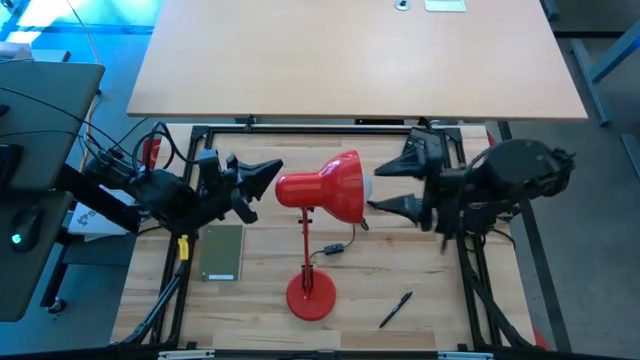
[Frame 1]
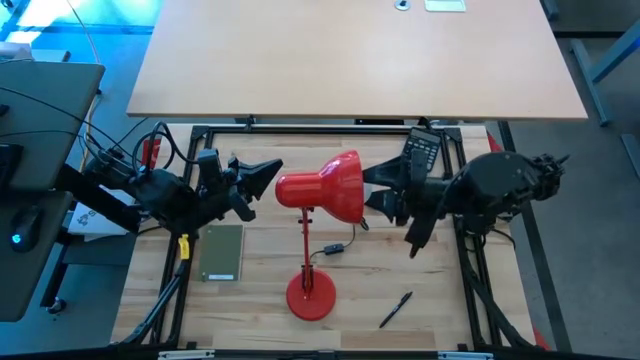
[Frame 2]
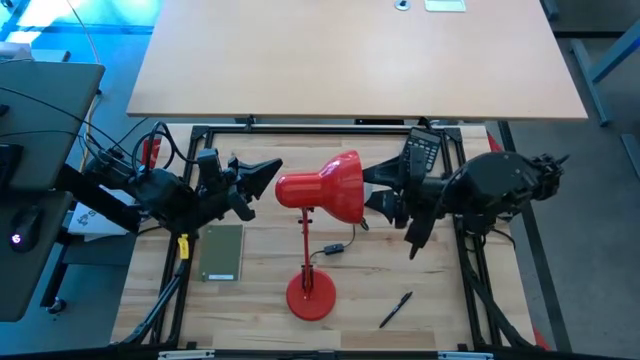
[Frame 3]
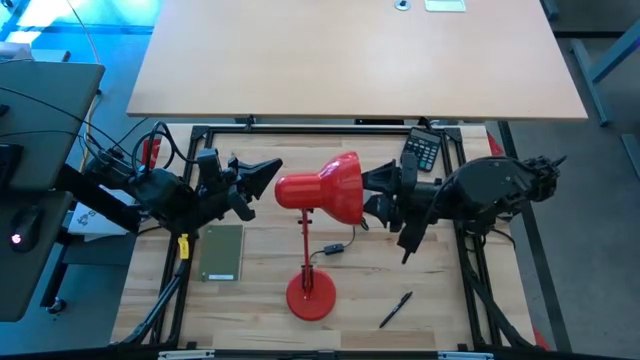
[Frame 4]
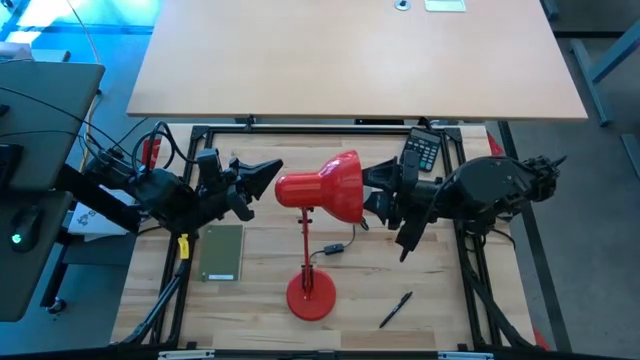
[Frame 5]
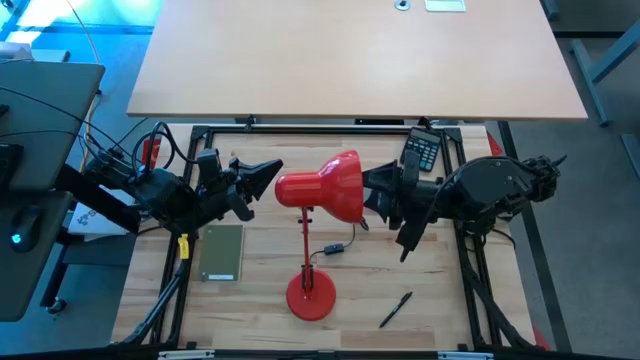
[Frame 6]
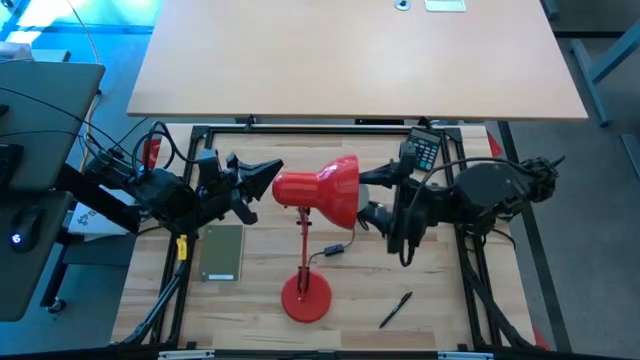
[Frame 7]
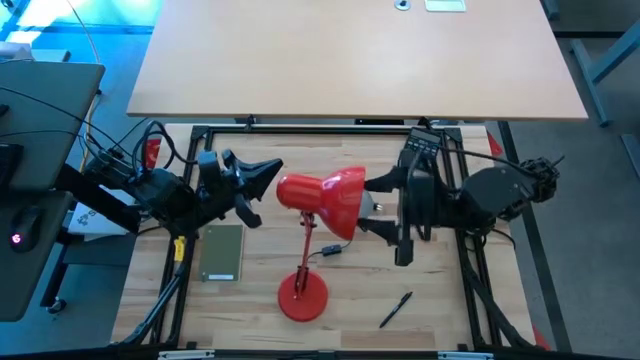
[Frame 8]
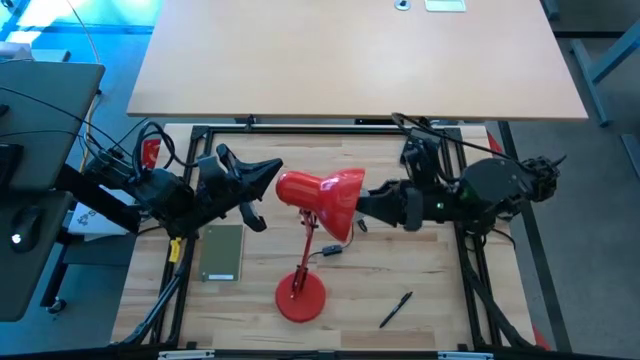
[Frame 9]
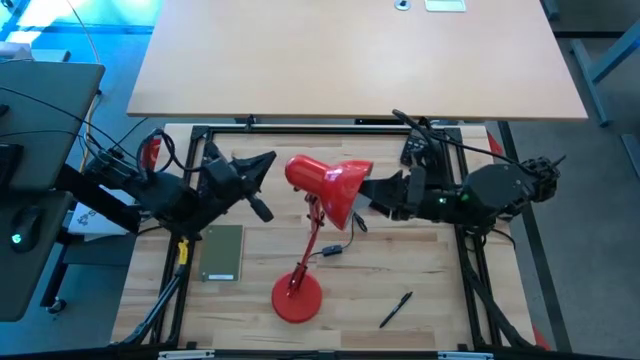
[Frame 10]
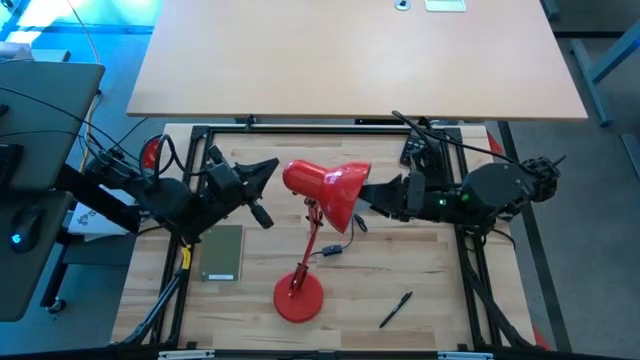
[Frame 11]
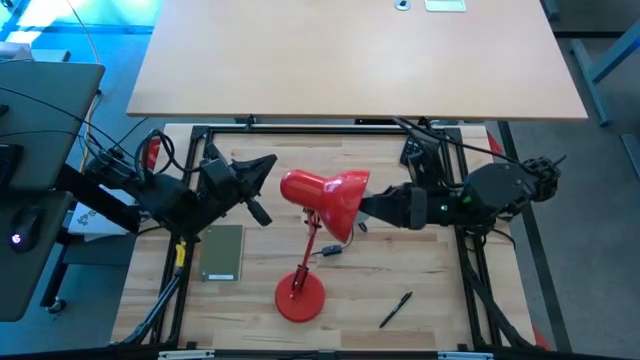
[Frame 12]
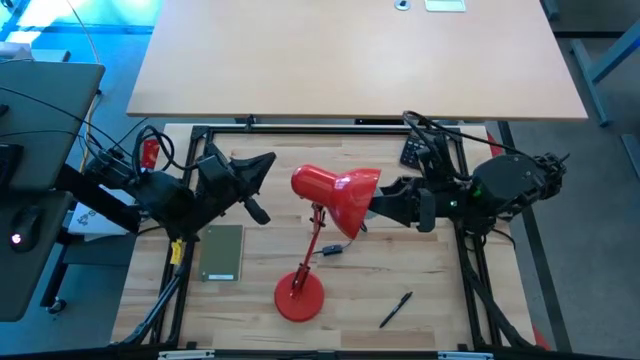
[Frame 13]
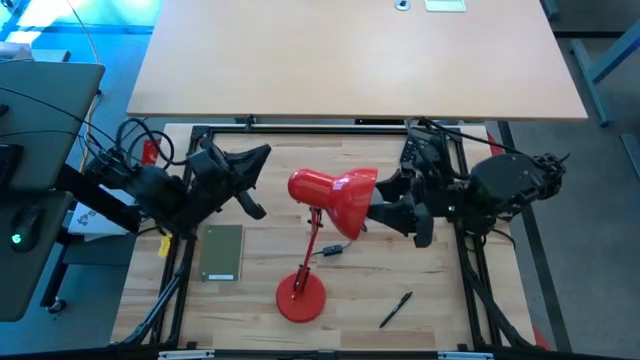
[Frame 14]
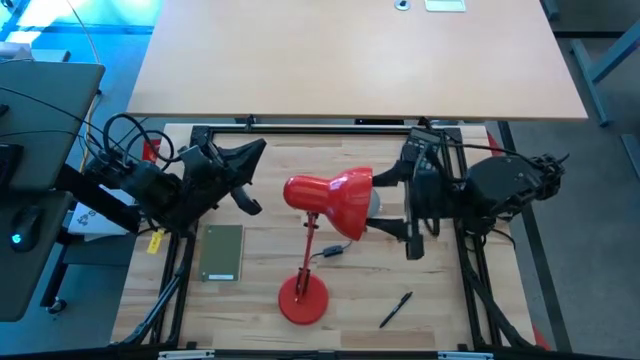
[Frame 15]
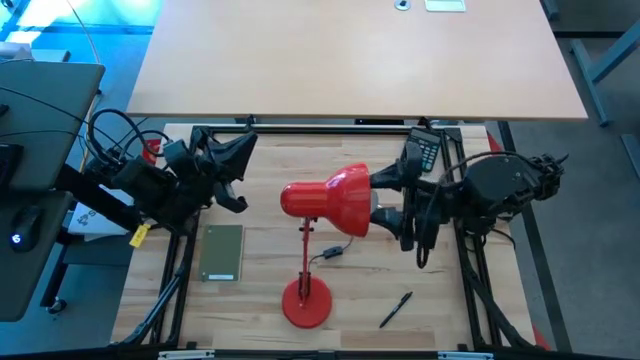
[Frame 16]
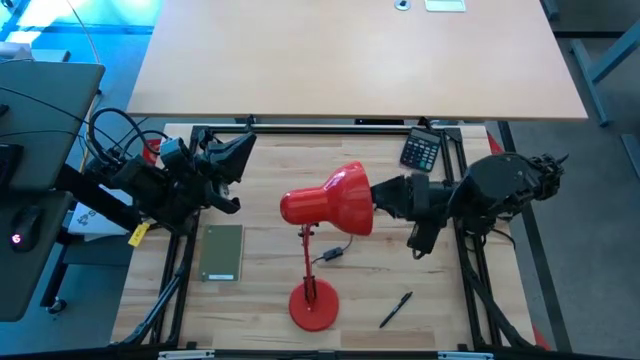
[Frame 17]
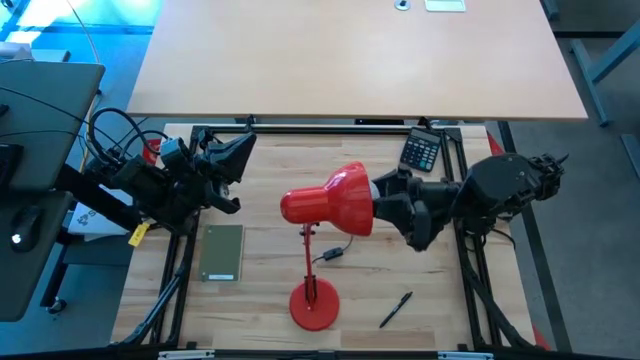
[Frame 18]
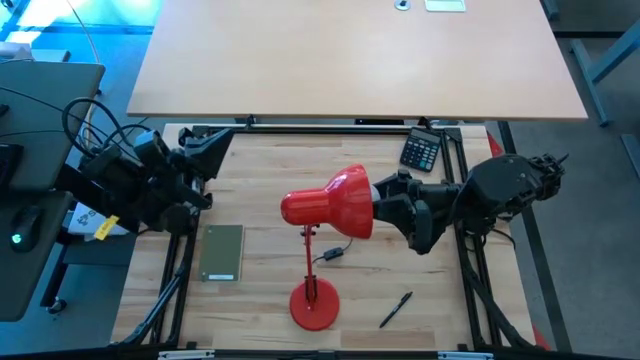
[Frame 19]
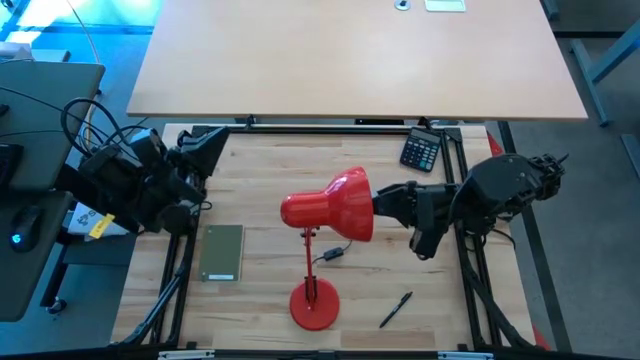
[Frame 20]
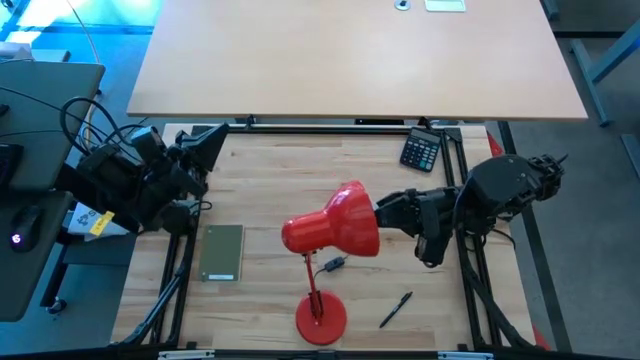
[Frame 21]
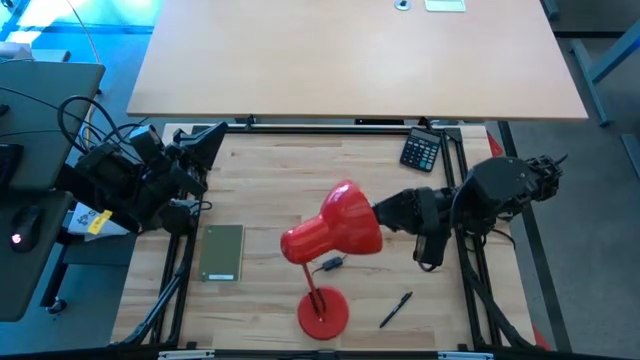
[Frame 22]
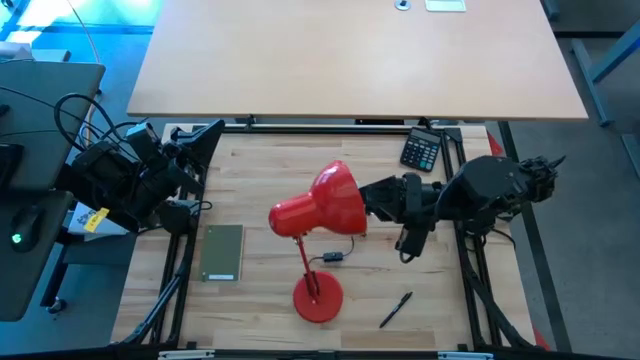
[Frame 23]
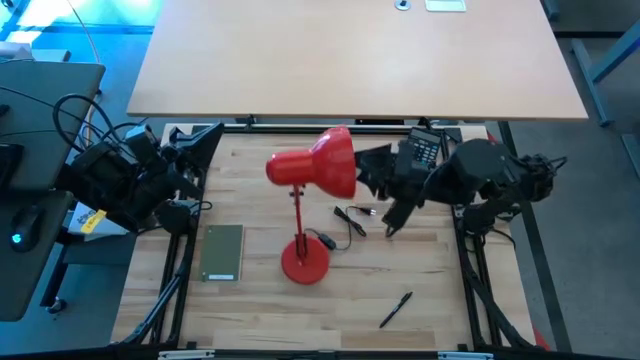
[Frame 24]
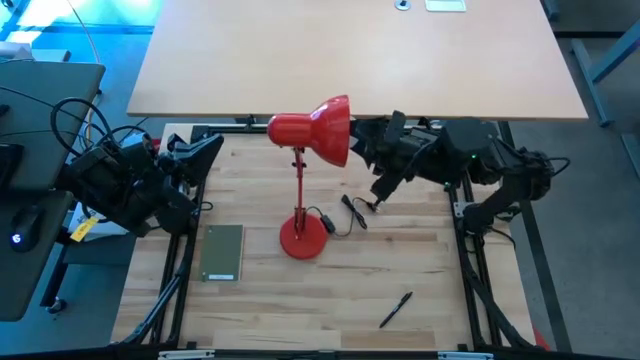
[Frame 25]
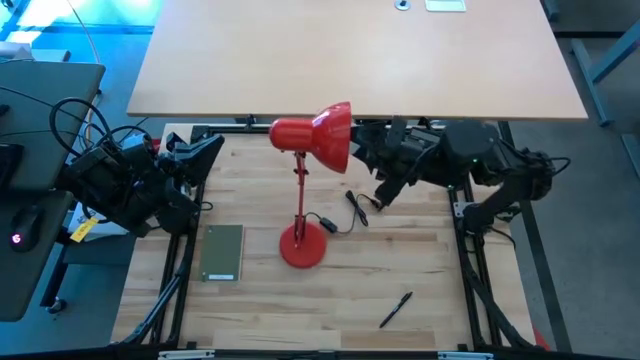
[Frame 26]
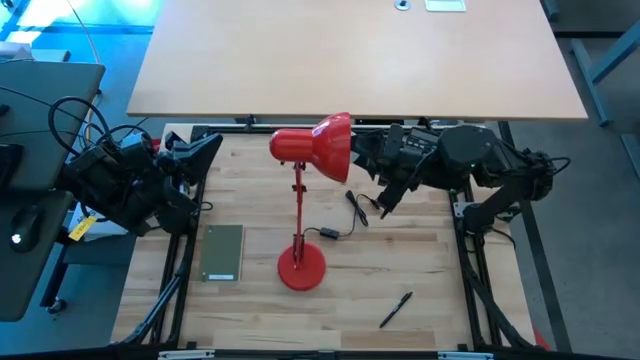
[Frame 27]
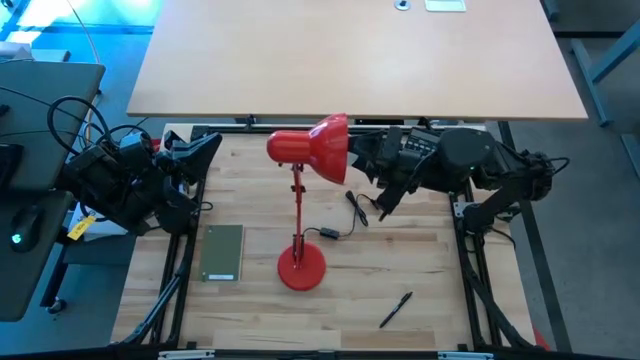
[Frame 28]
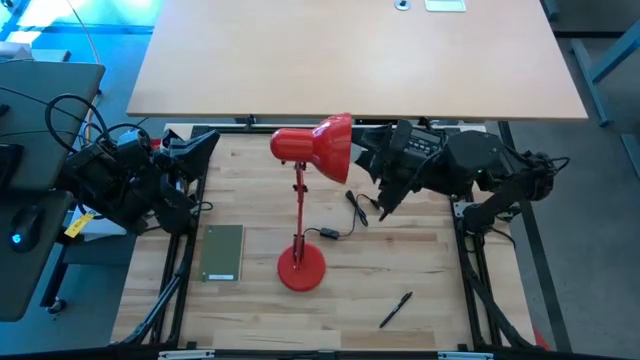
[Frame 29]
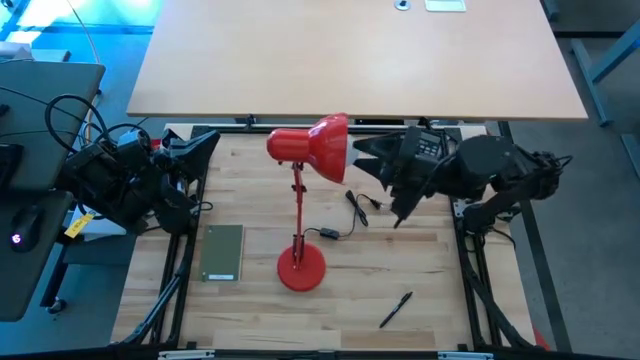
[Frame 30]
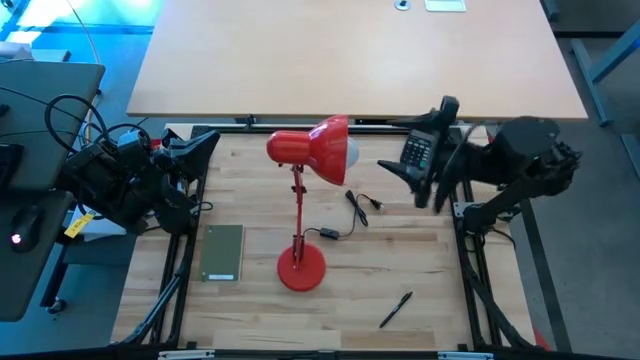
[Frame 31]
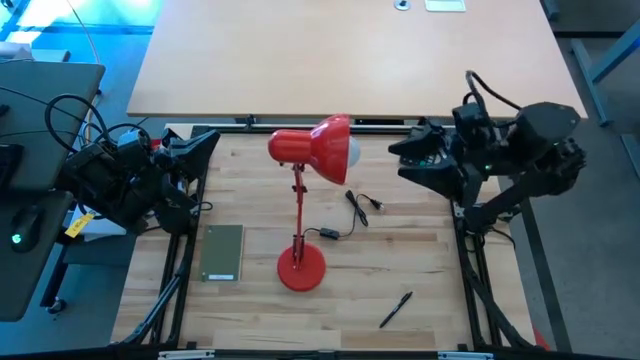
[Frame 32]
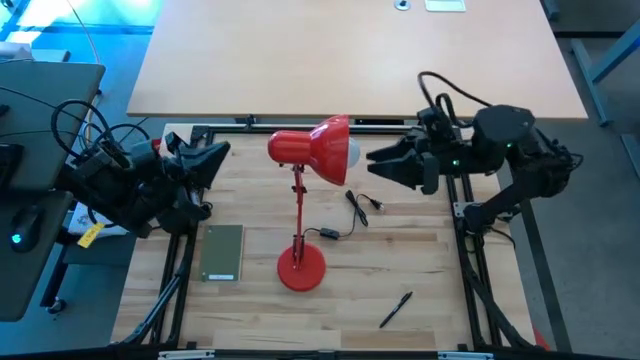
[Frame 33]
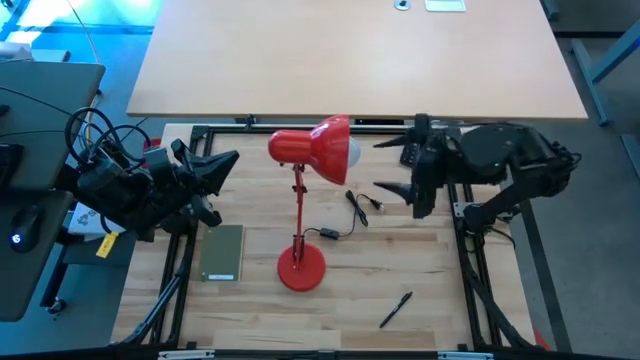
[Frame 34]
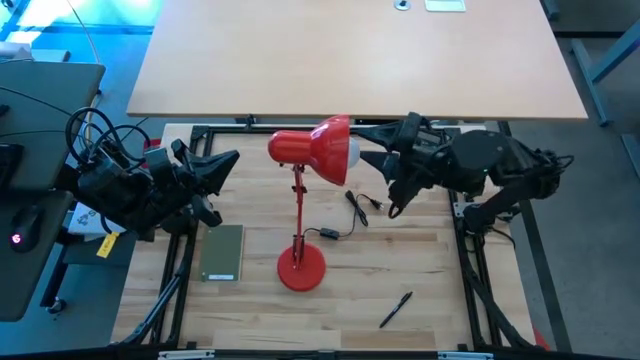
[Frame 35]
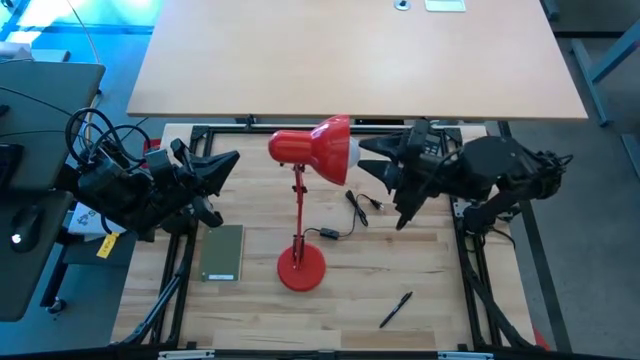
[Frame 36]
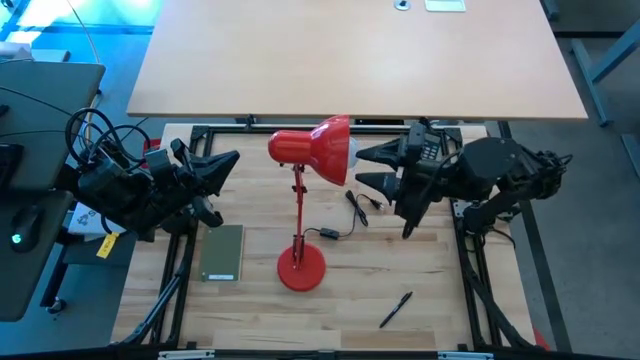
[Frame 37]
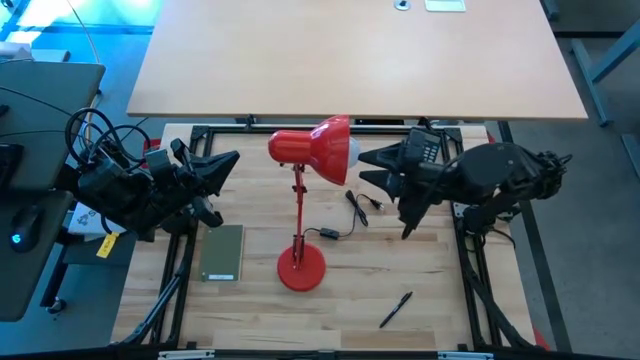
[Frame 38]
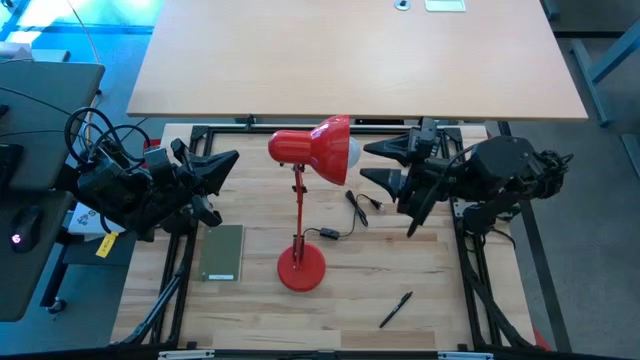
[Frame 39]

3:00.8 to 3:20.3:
Task: Screw lightbulb
Insert the white lightbulb into the red lamp

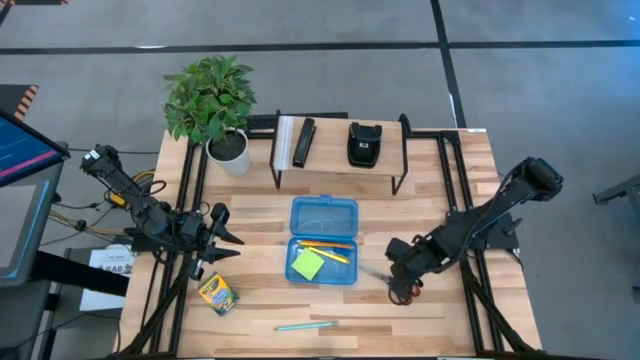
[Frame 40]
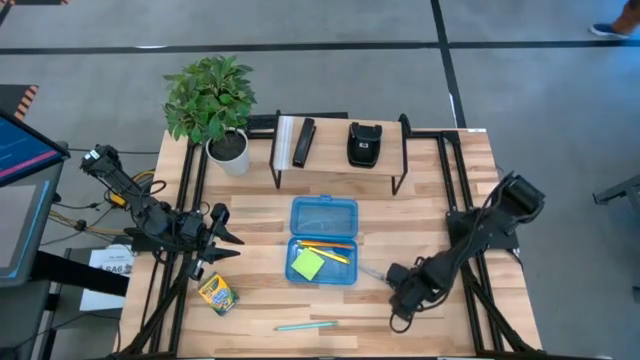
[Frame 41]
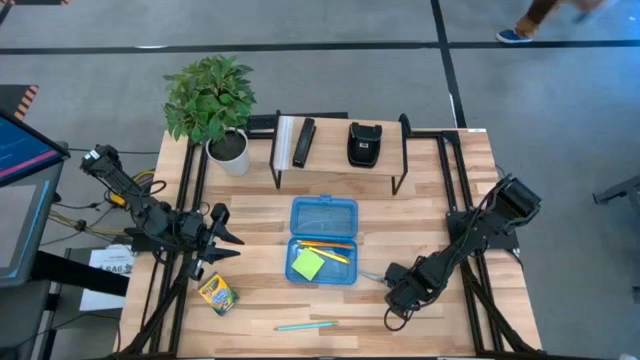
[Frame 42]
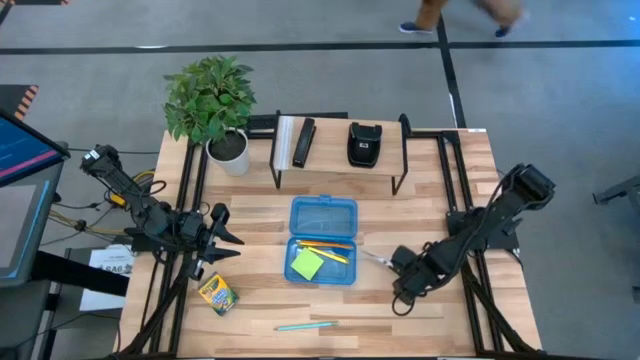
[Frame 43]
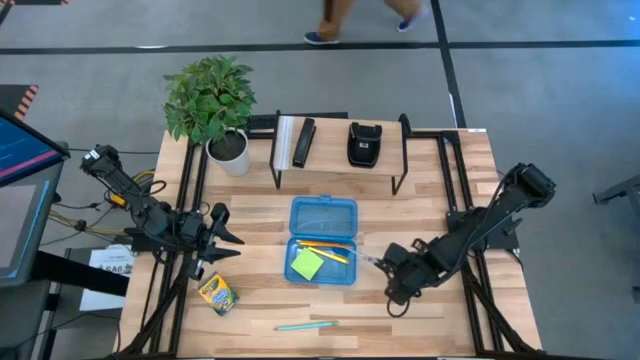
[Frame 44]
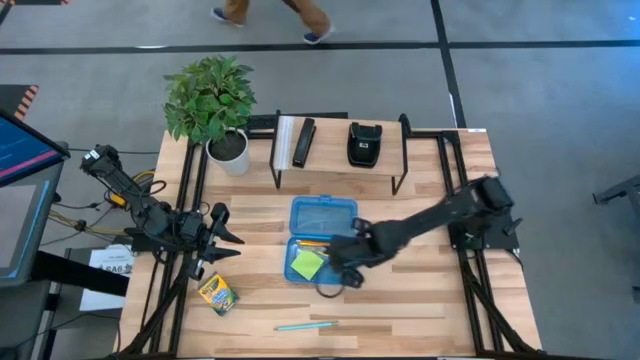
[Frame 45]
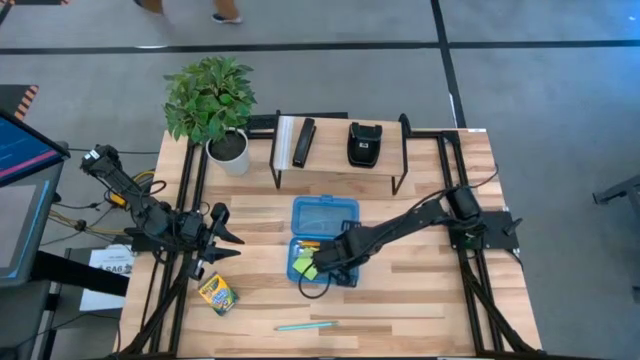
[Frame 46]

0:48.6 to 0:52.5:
Task: Pack school essentials
Put the black scissors into the blue supply box
